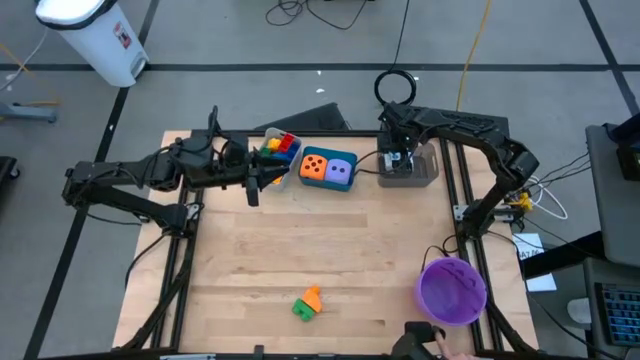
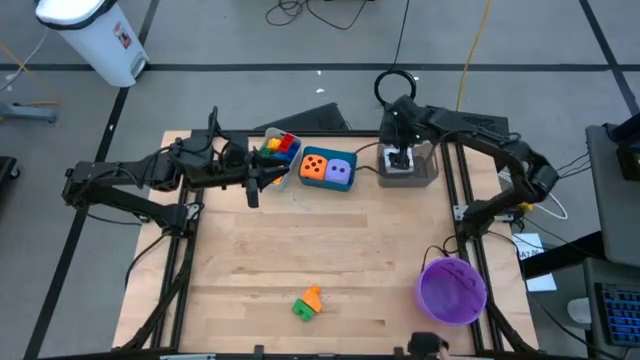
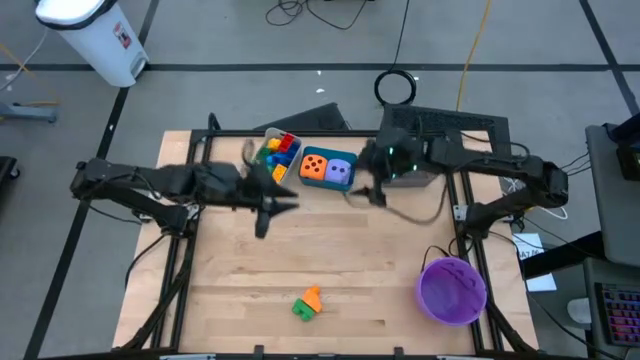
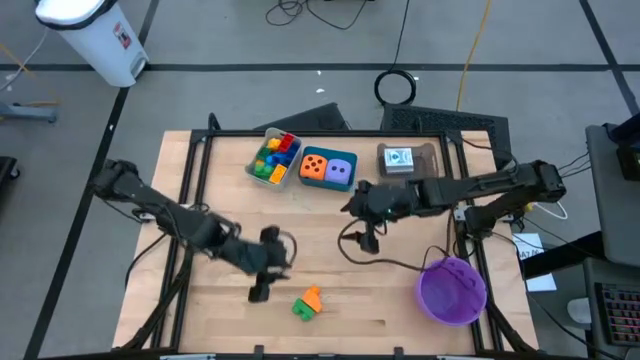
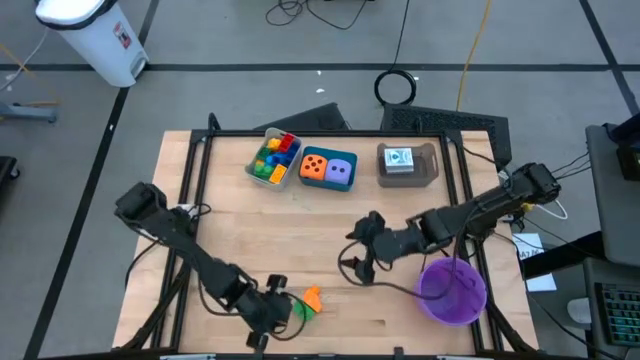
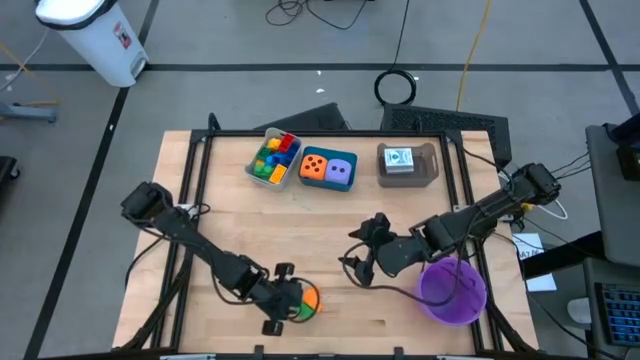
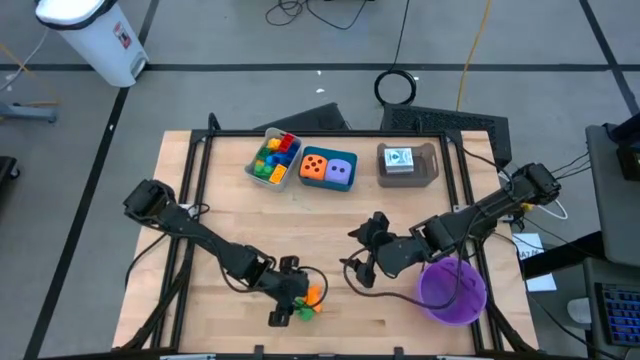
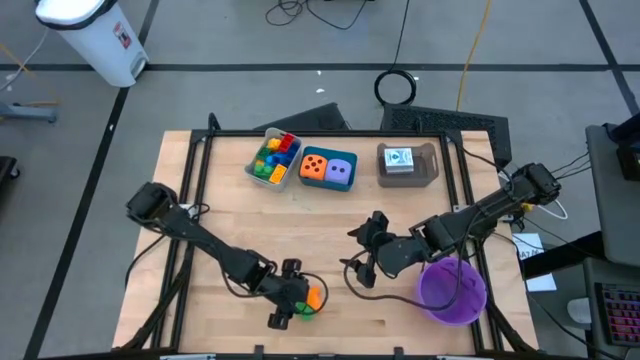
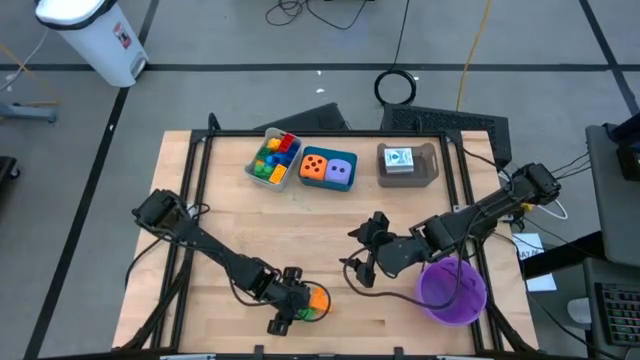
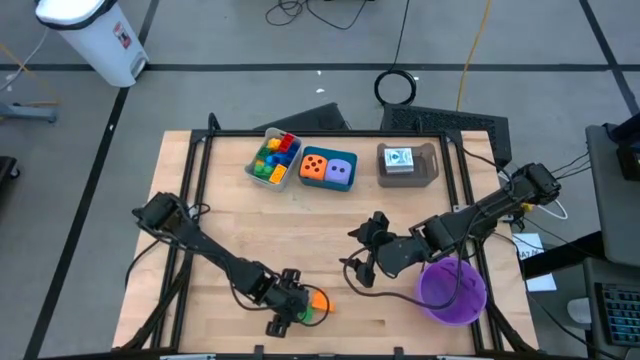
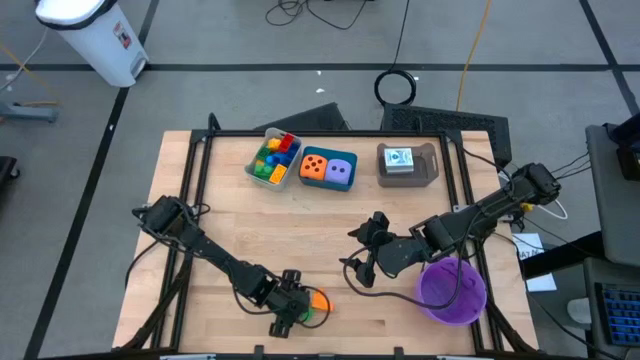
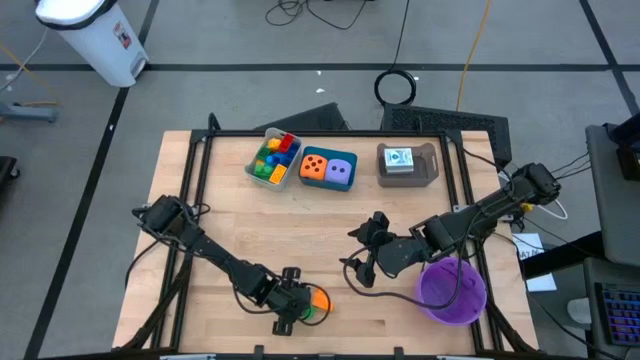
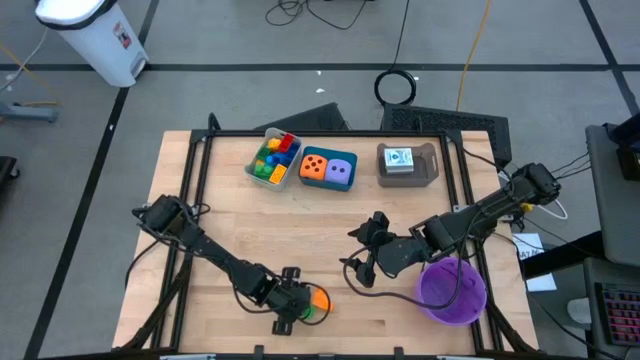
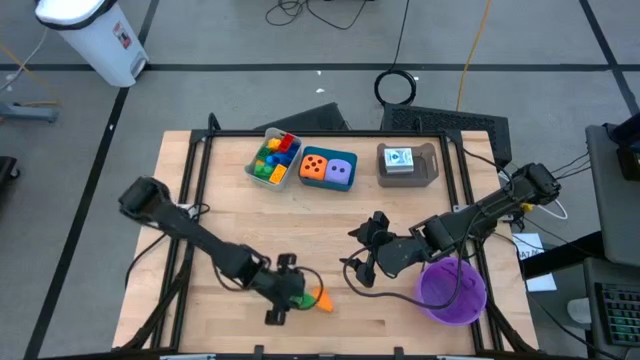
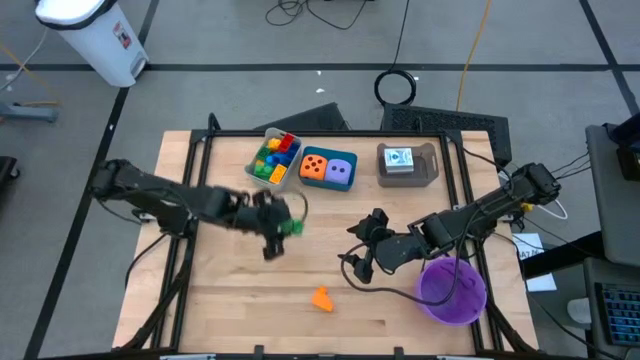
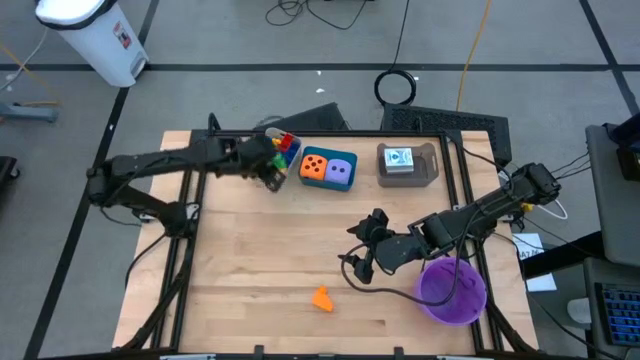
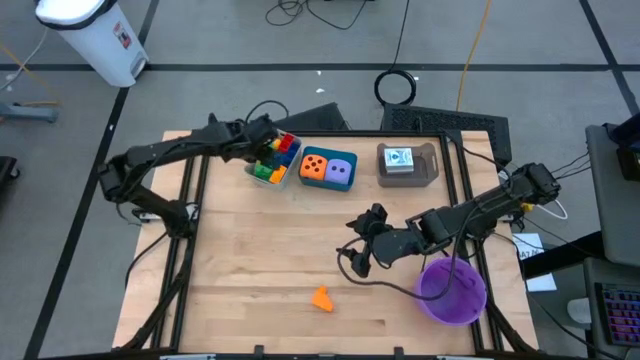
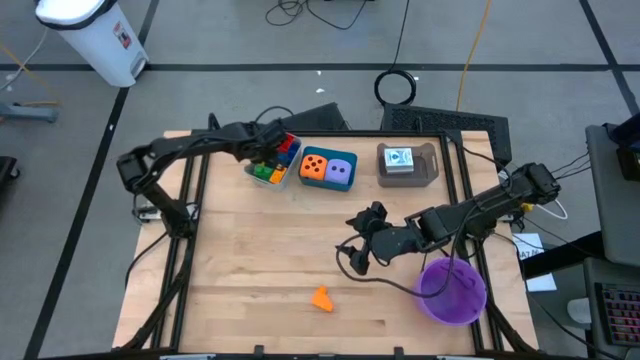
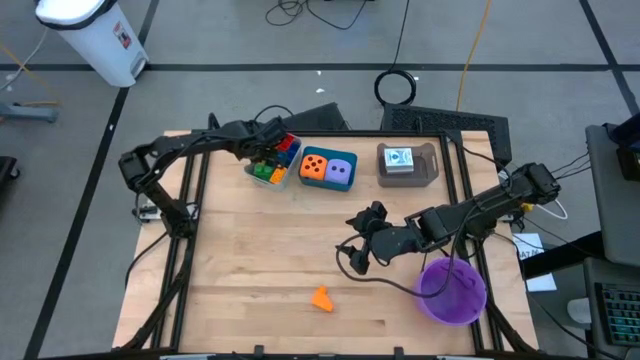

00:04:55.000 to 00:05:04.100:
Task: Pick & Place Toys
Put the green game piece into the gray bin

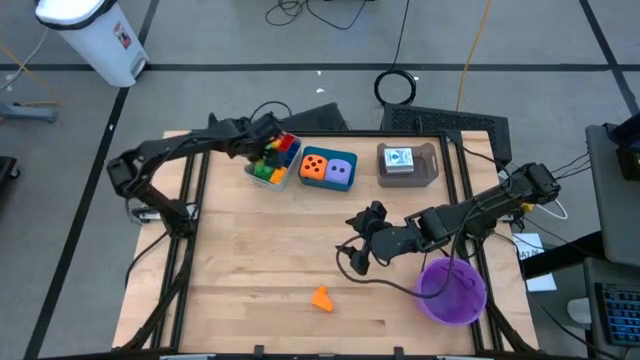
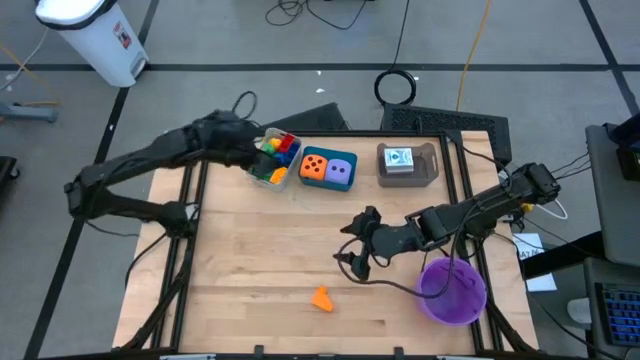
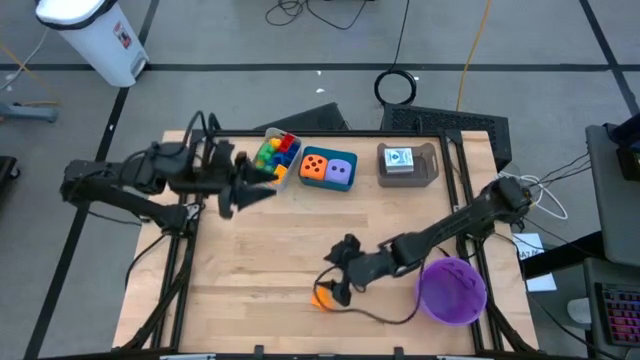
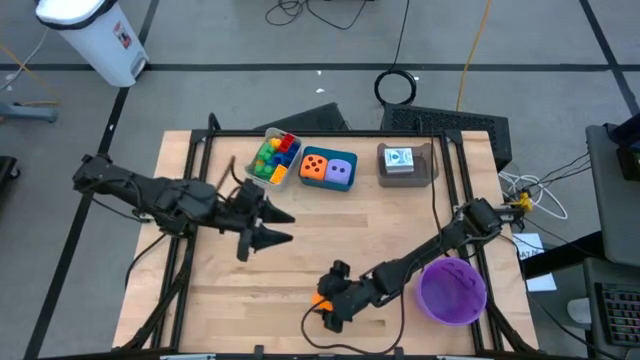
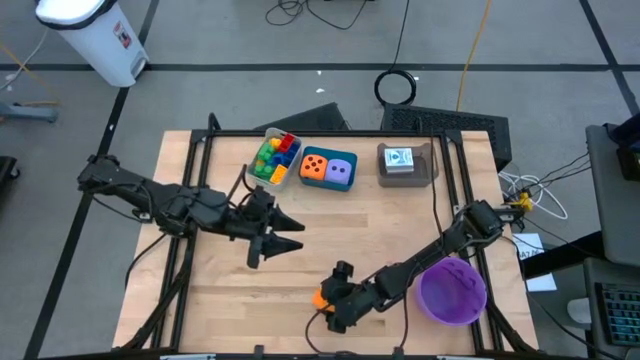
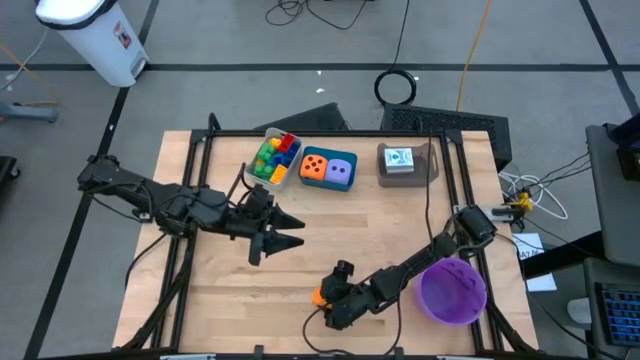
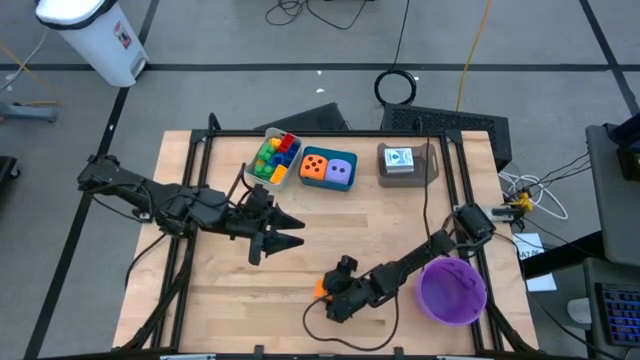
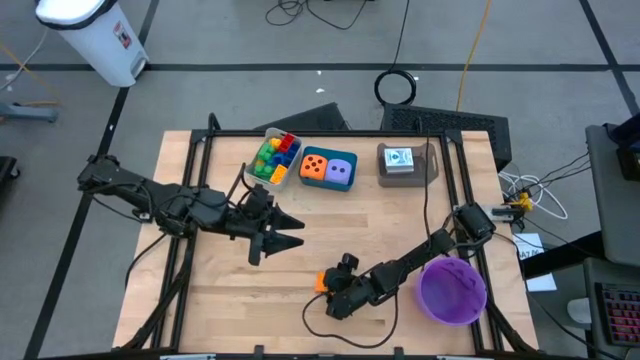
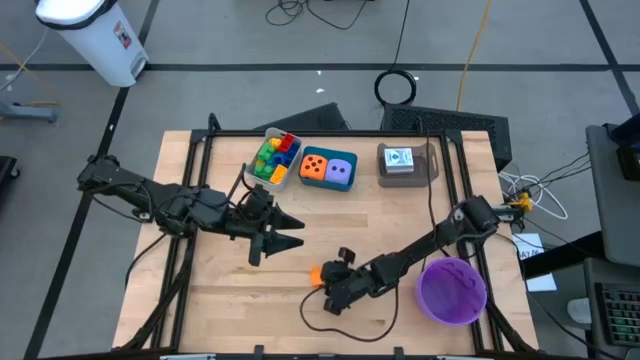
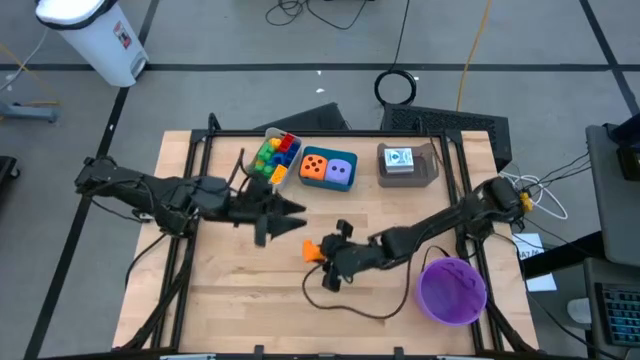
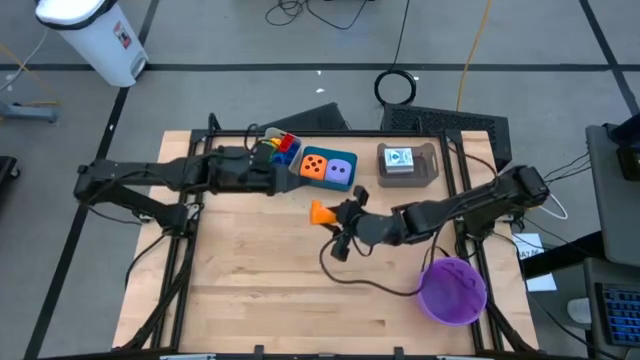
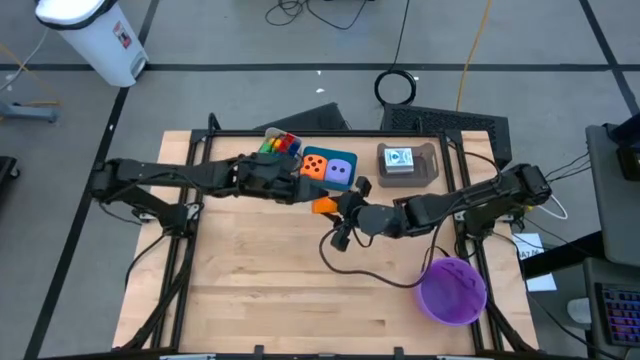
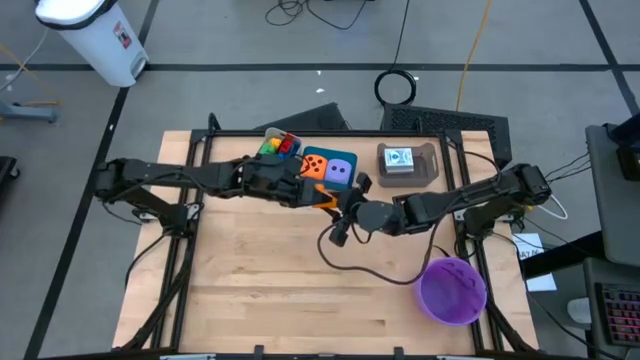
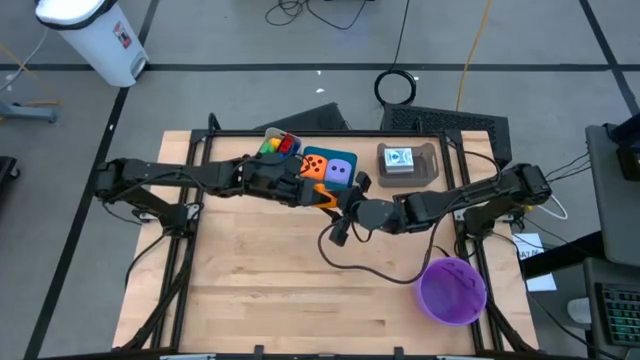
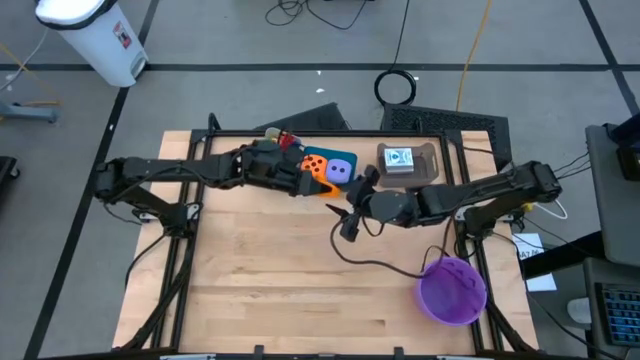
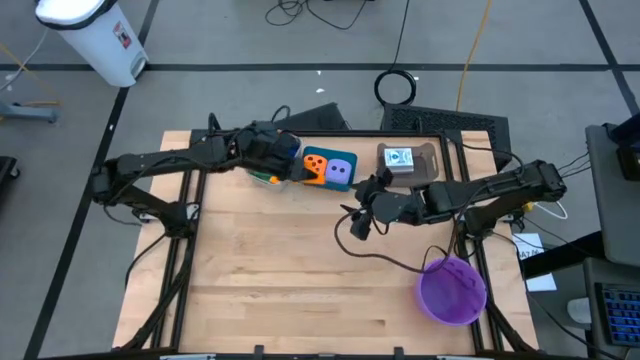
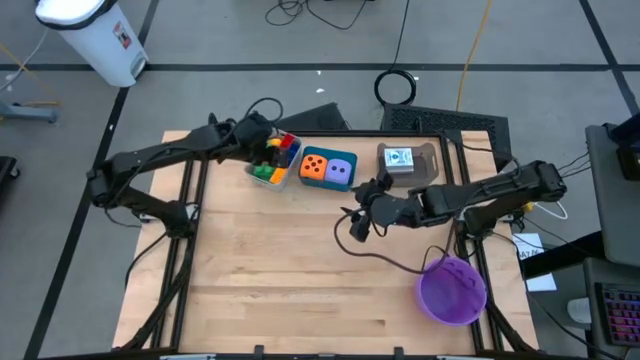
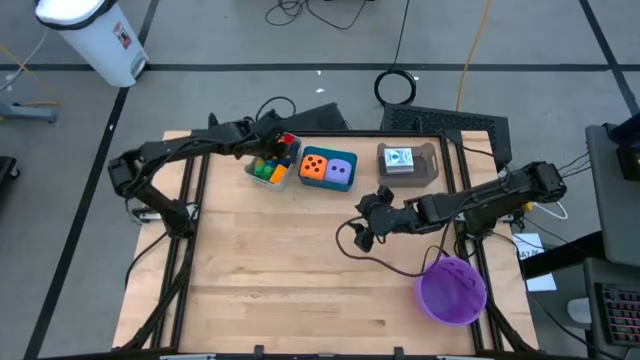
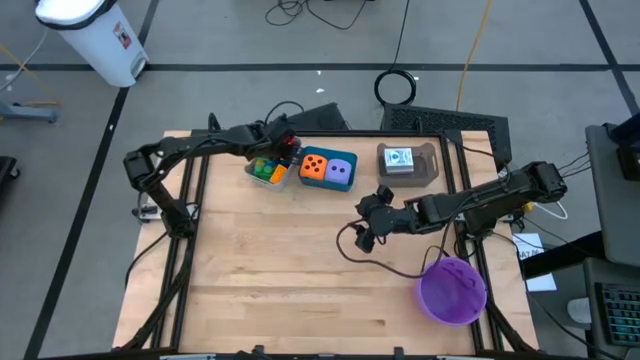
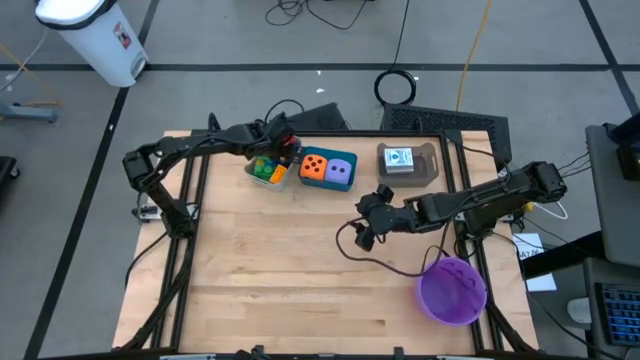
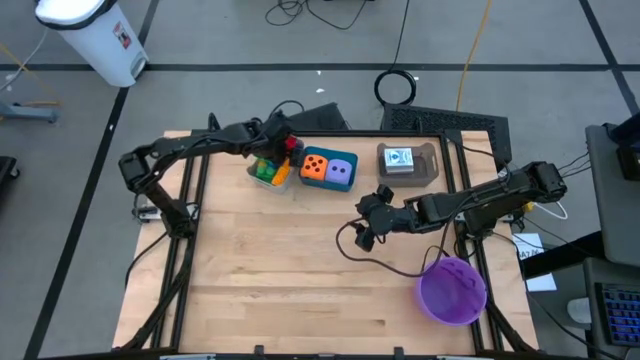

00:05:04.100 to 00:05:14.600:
Put the orange game piece into the gray bin
